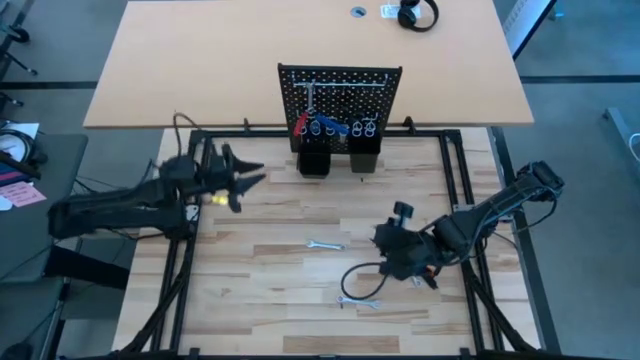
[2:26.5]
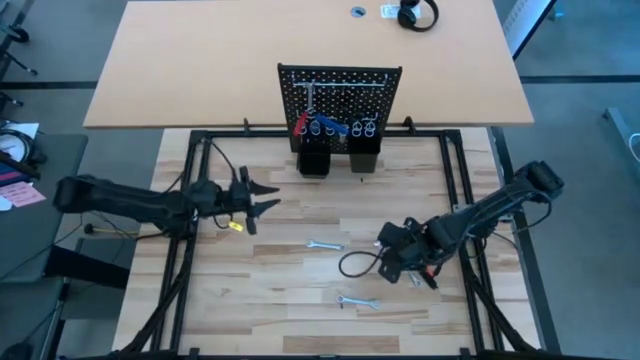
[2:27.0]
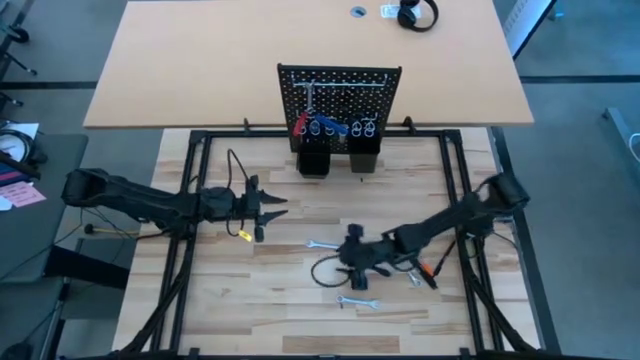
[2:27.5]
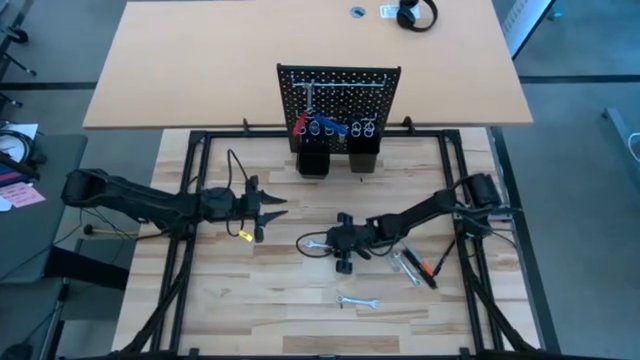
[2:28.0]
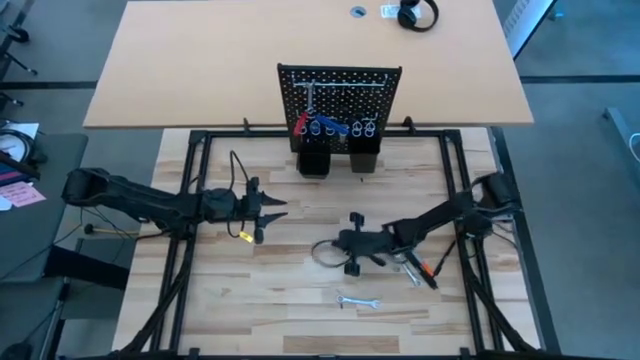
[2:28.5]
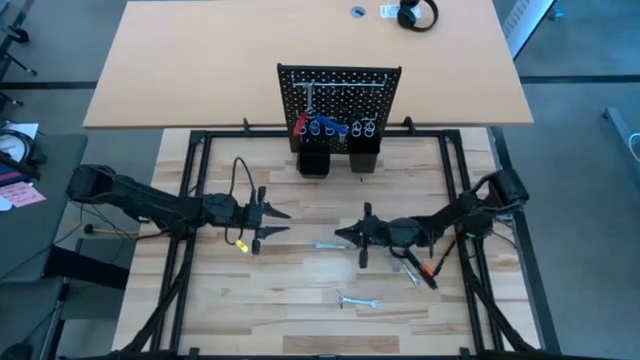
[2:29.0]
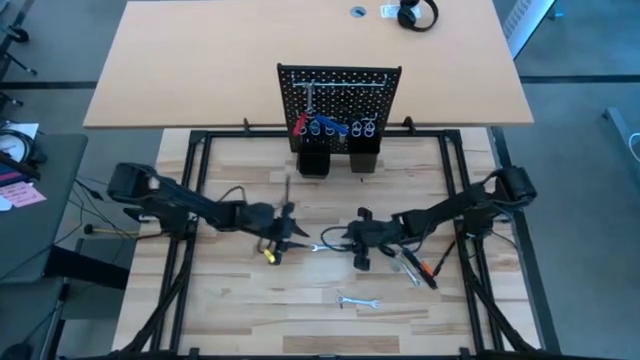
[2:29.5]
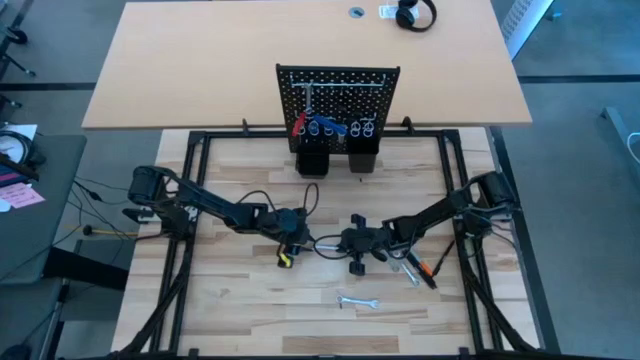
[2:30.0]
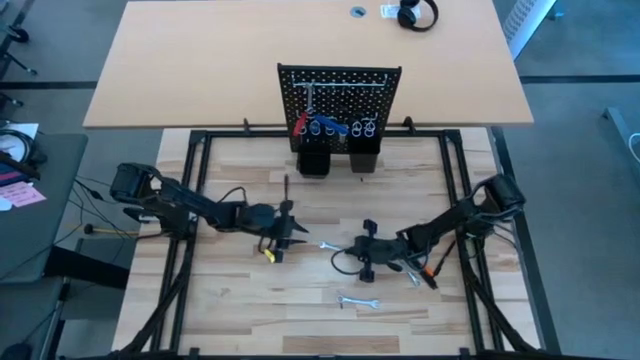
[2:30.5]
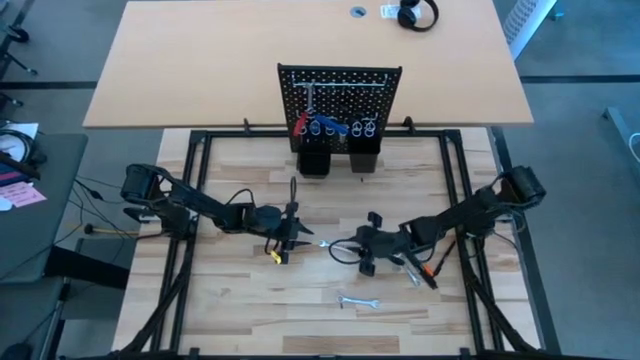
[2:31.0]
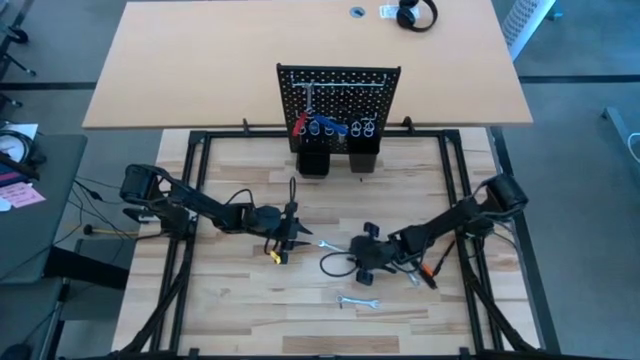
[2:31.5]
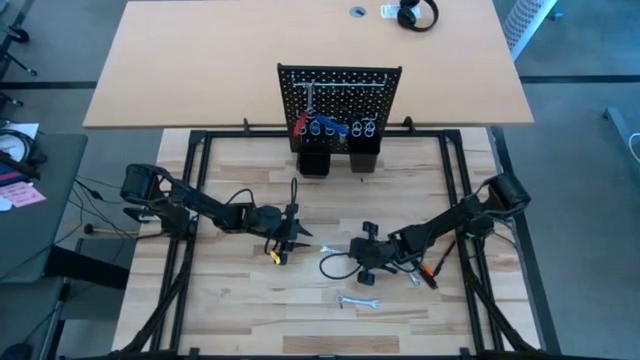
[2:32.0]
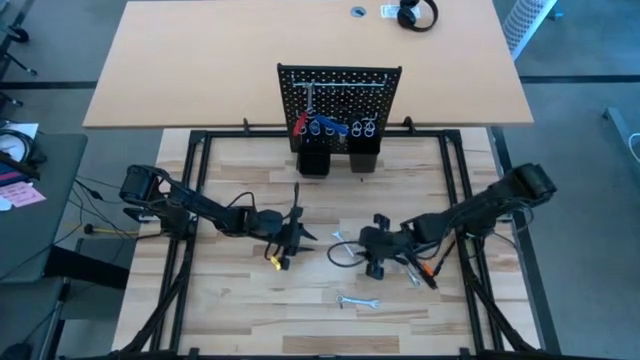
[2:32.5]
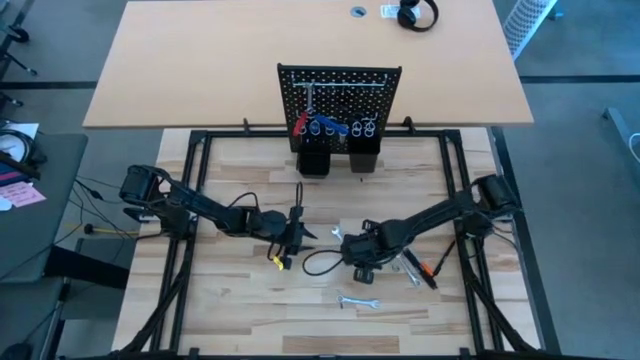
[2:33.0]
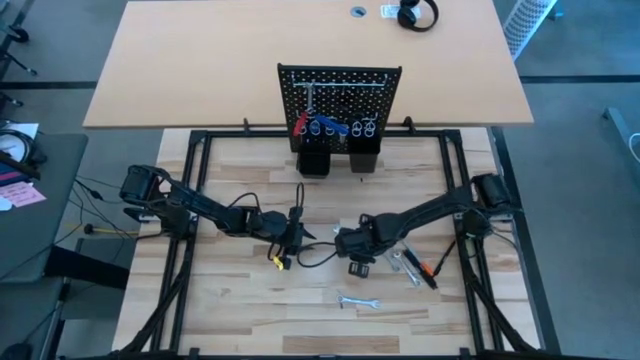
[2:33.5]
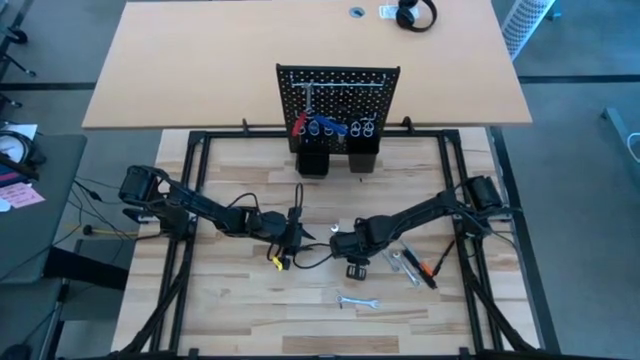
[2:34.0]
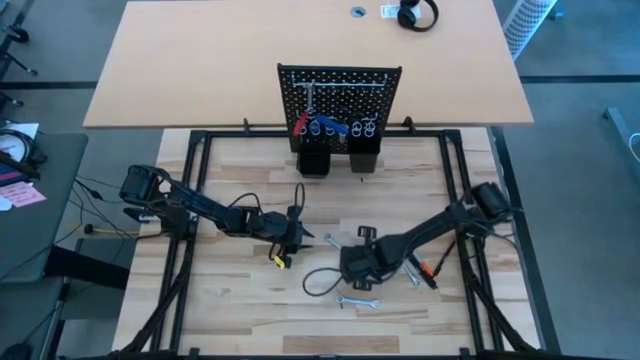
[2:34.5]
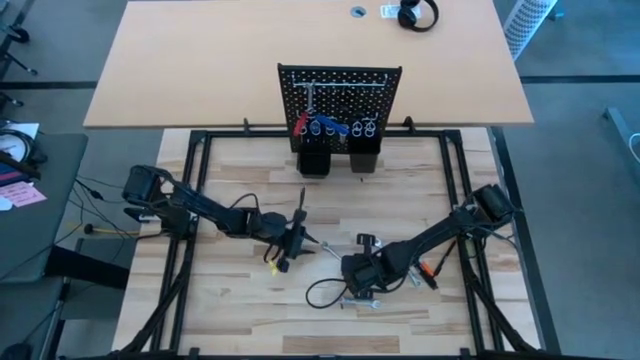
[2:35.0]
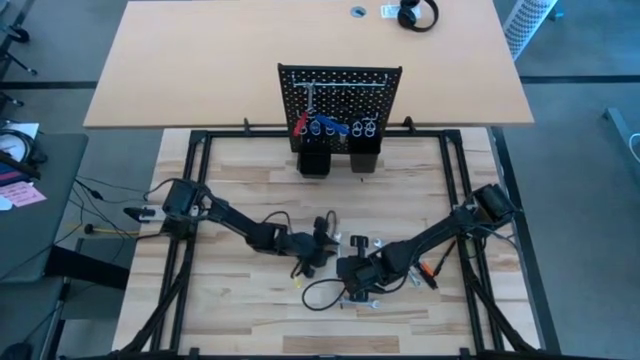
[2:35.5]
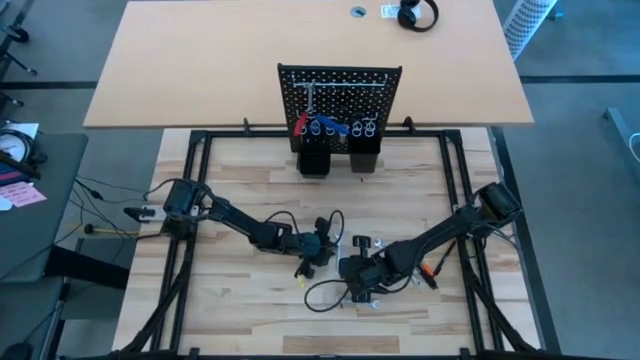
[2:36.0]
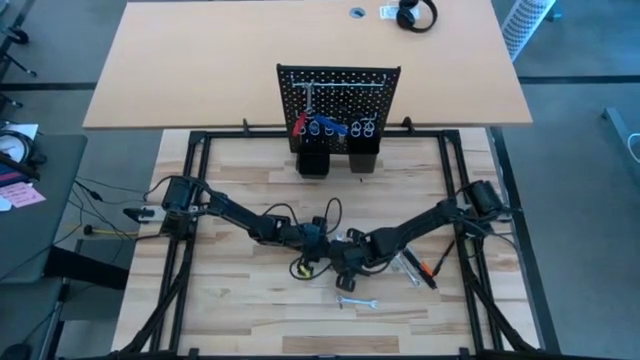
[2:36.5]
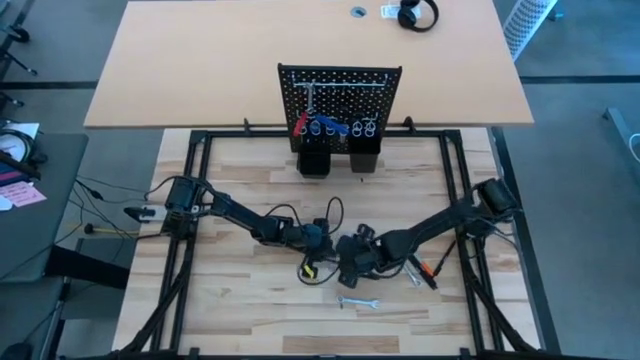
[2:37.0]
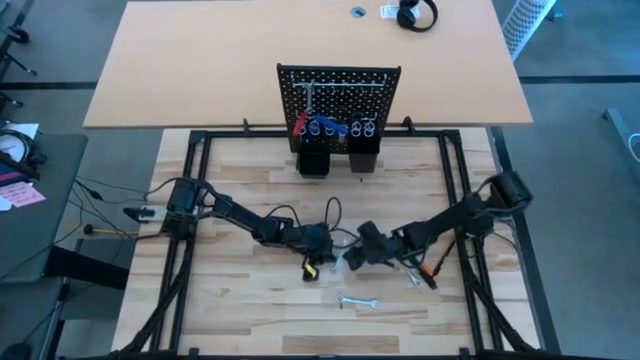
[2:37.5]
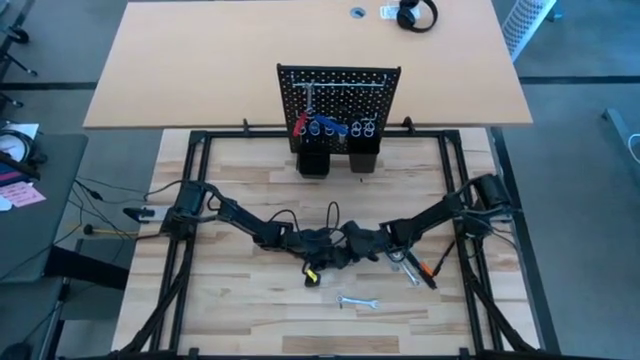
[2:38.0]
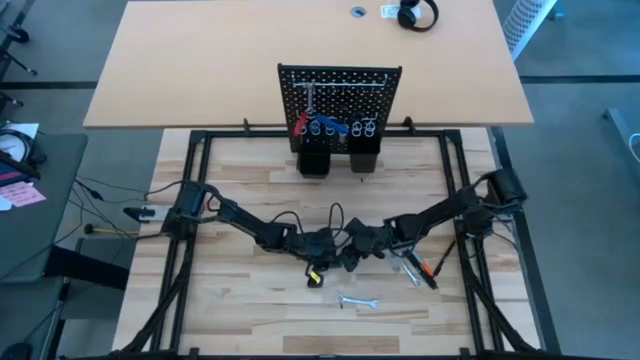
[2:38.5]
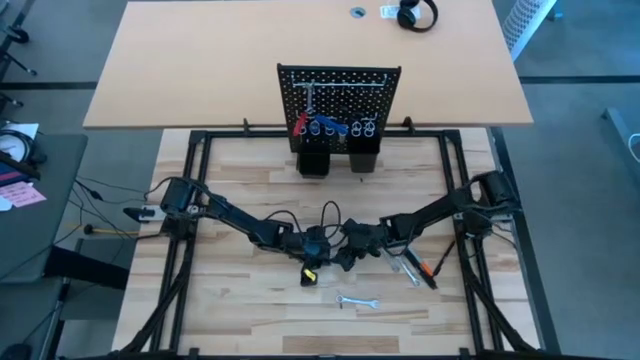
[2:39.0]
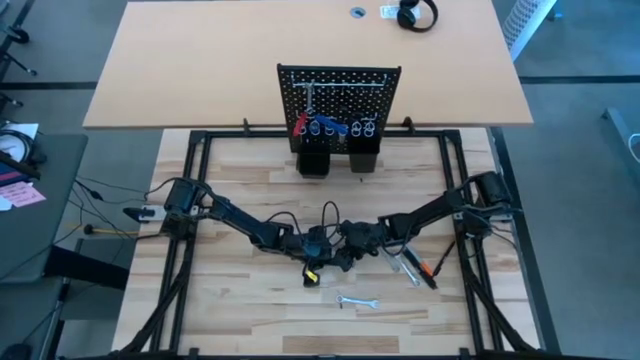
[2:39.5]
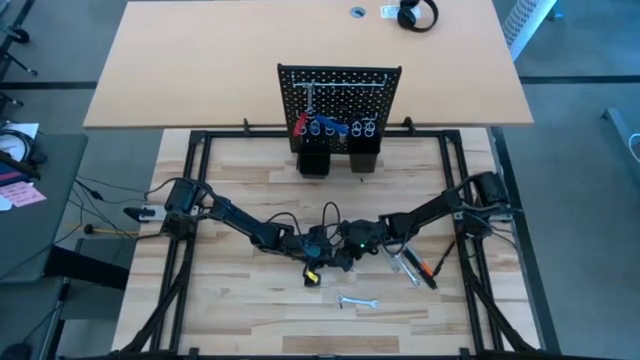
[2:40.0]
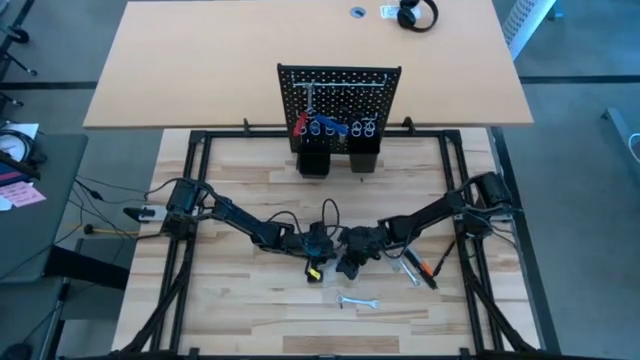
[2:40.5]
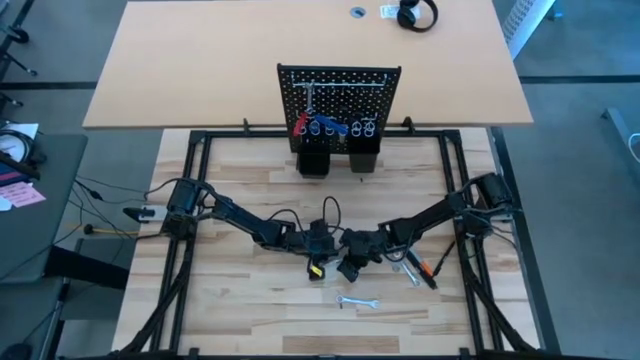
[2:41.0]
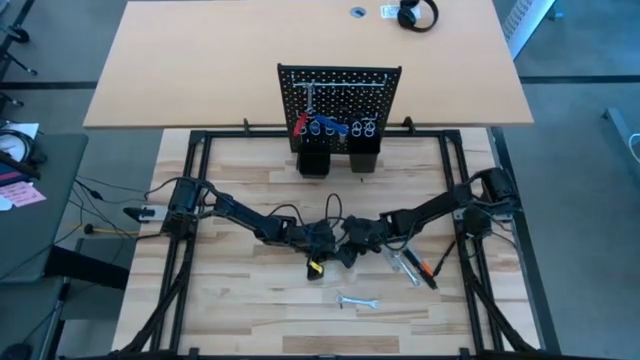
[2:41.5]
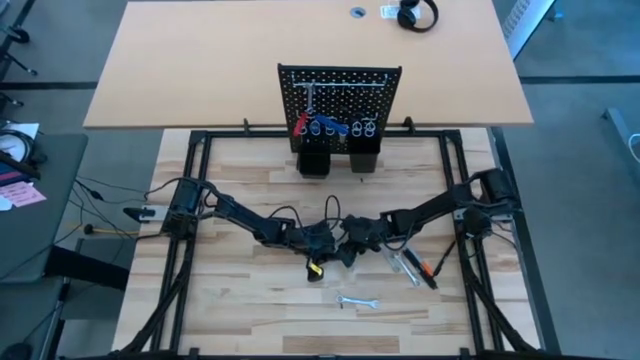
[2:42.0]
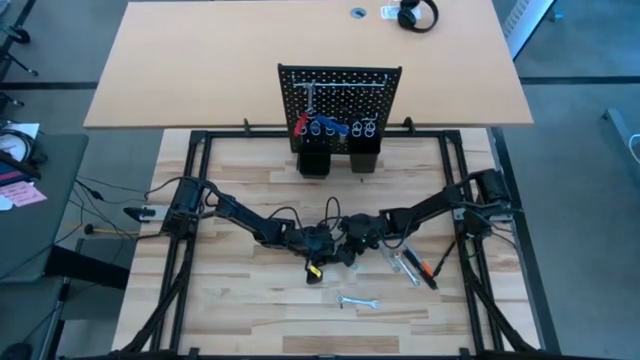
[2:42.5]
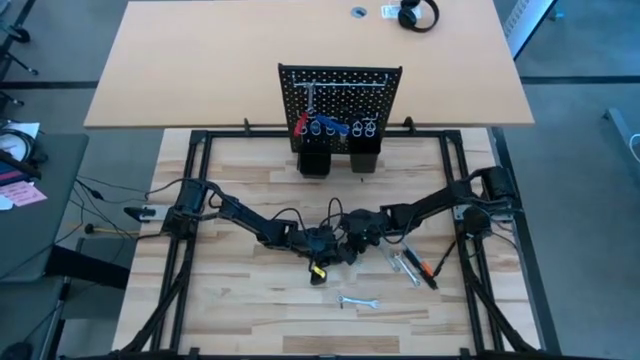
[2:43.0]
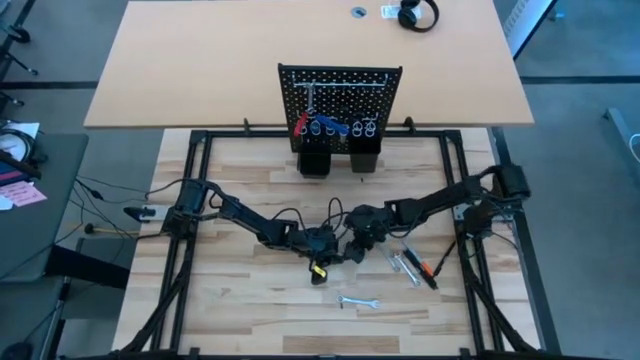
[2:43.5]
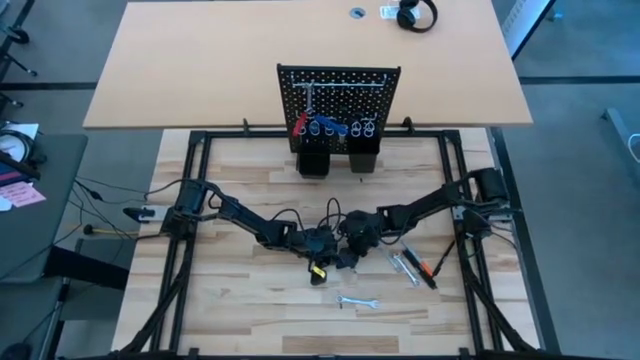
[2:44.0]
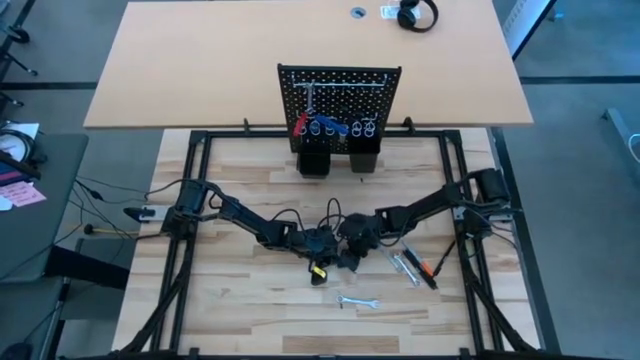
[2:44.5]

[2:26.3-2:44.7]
Task: Hang tools onto peg board
Hang the wrench on the pegboard
